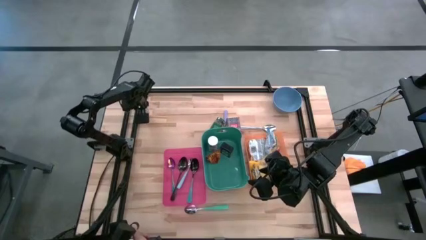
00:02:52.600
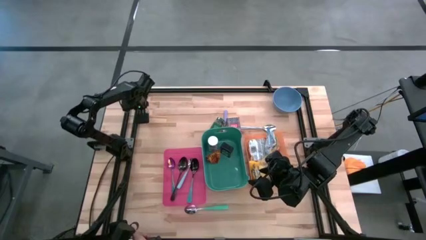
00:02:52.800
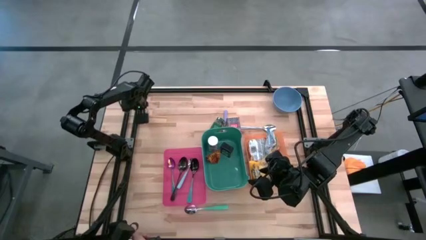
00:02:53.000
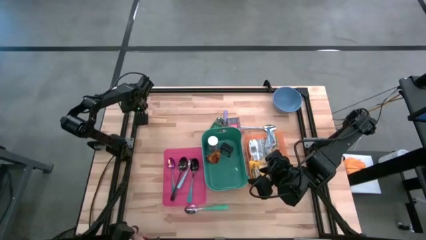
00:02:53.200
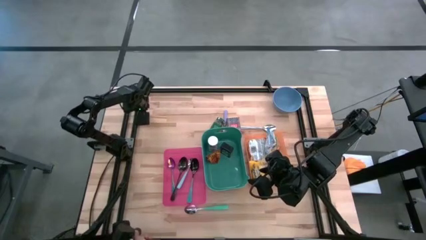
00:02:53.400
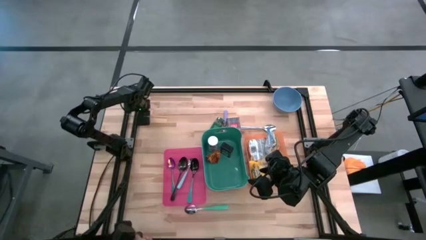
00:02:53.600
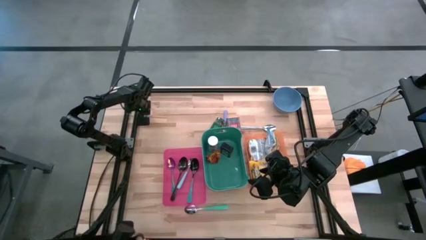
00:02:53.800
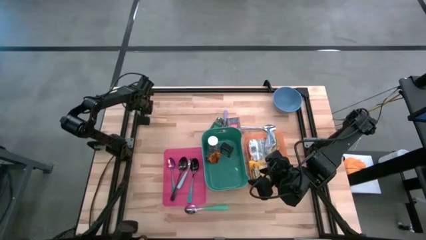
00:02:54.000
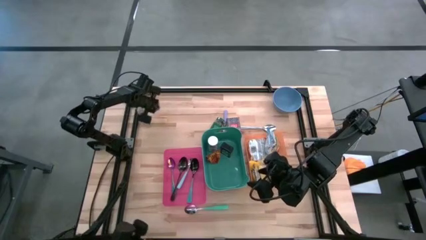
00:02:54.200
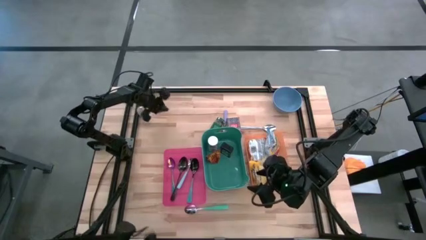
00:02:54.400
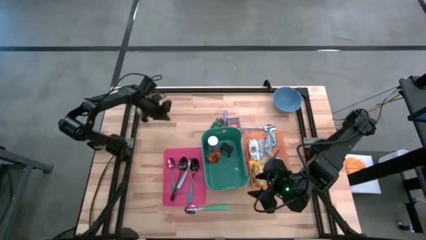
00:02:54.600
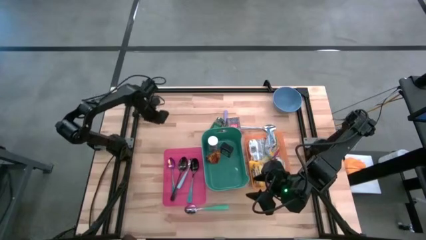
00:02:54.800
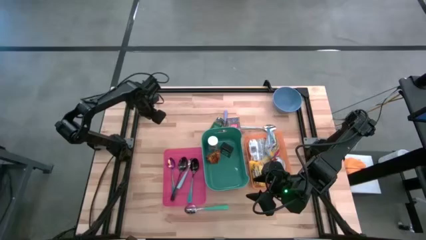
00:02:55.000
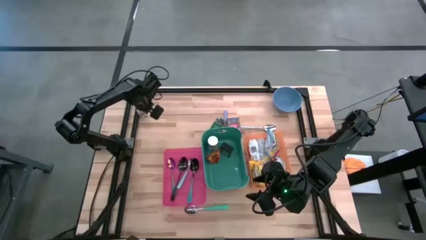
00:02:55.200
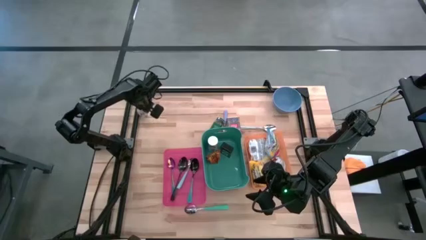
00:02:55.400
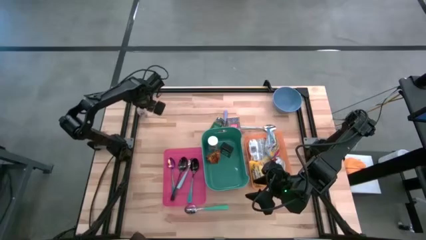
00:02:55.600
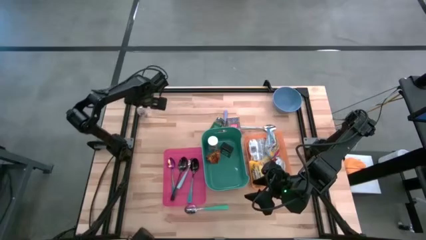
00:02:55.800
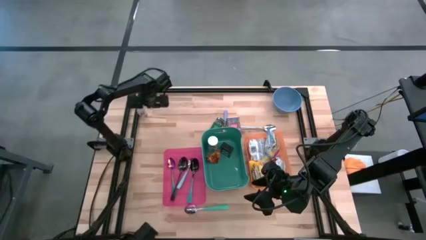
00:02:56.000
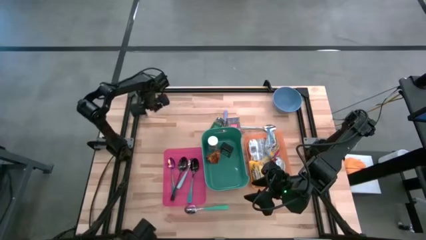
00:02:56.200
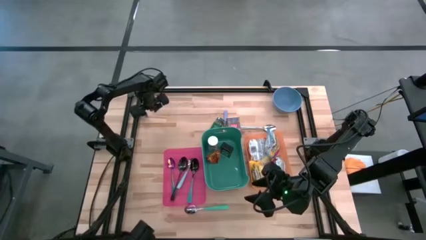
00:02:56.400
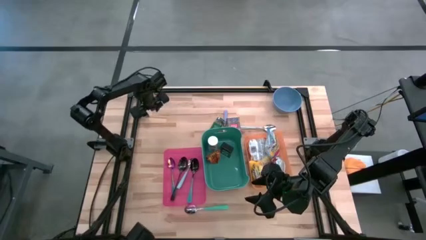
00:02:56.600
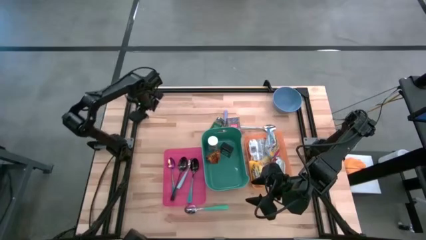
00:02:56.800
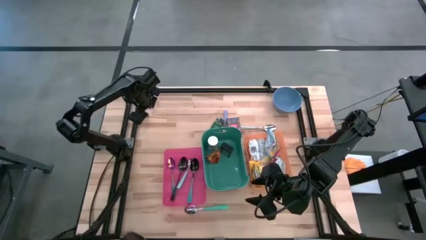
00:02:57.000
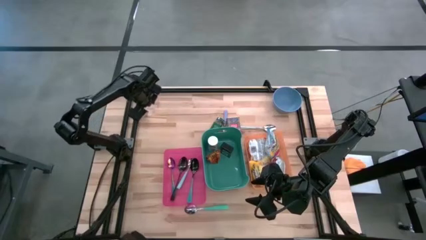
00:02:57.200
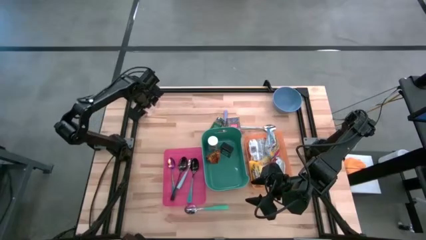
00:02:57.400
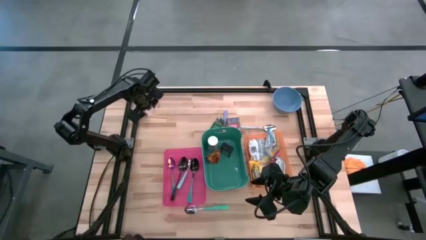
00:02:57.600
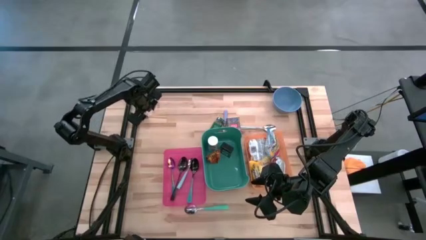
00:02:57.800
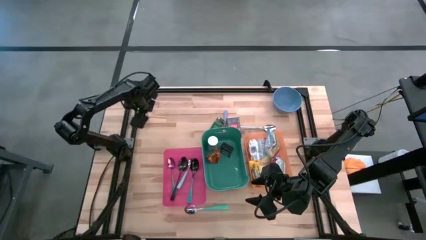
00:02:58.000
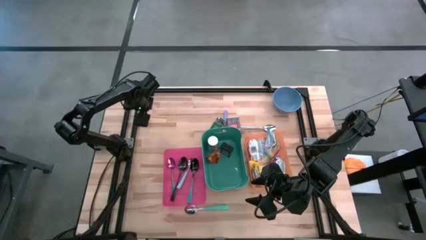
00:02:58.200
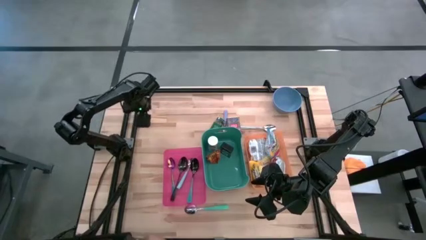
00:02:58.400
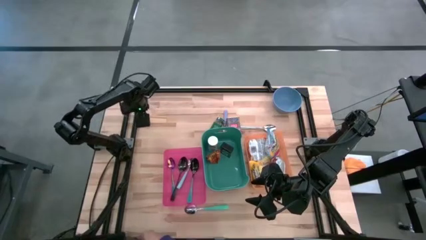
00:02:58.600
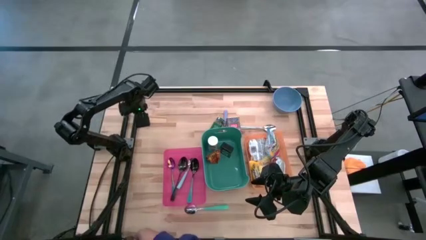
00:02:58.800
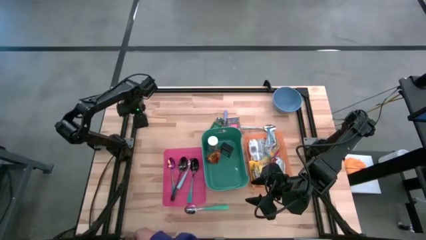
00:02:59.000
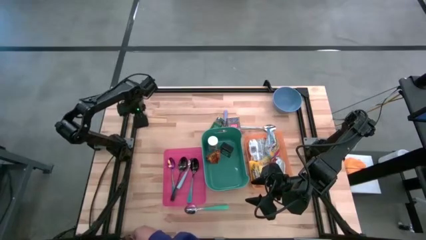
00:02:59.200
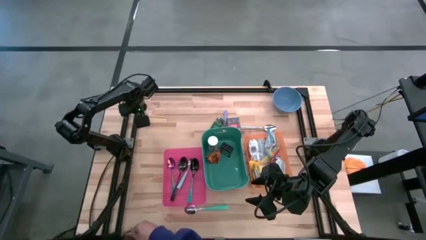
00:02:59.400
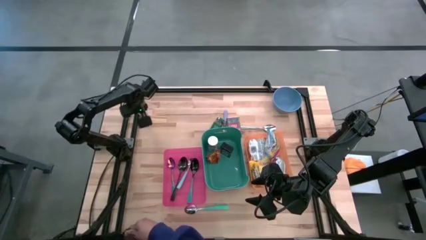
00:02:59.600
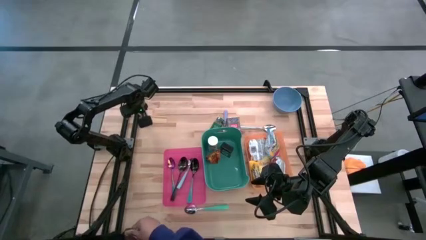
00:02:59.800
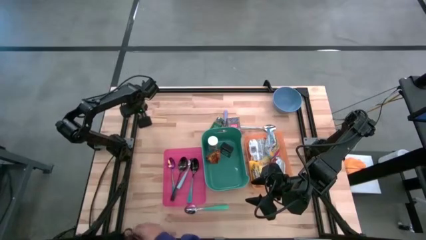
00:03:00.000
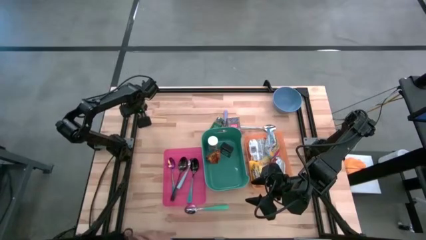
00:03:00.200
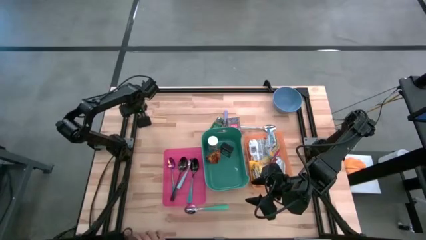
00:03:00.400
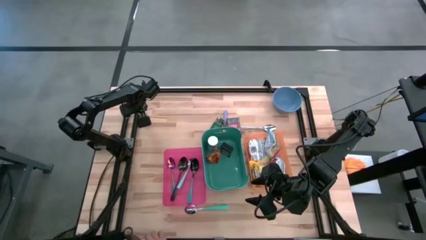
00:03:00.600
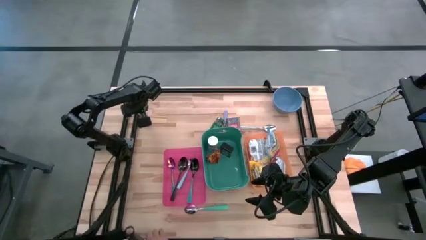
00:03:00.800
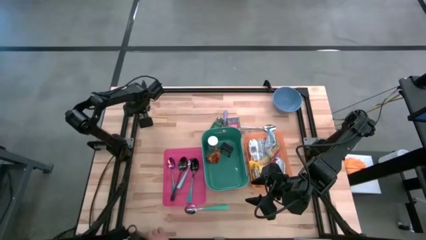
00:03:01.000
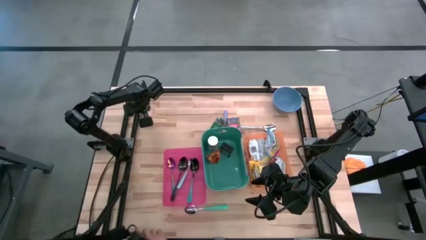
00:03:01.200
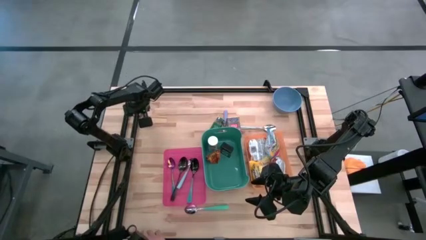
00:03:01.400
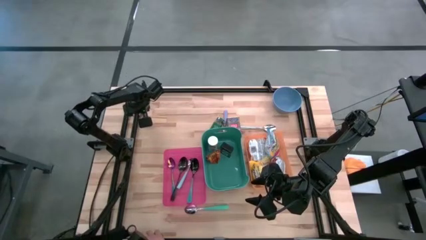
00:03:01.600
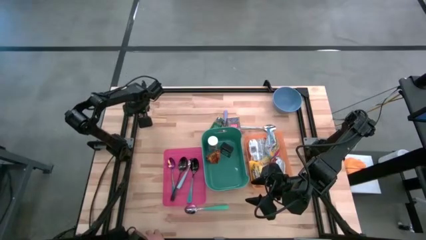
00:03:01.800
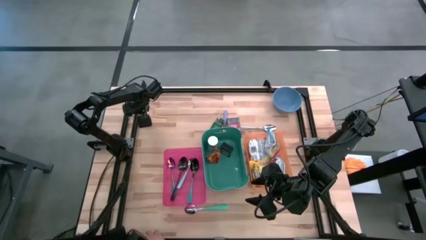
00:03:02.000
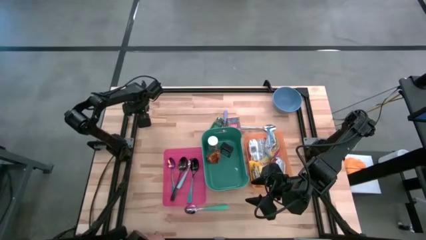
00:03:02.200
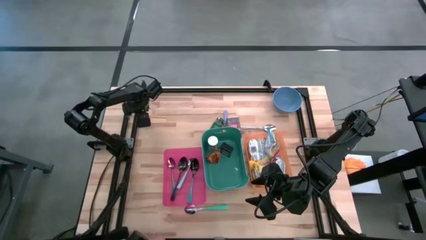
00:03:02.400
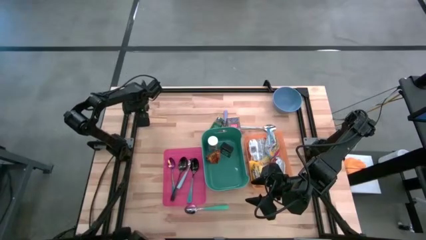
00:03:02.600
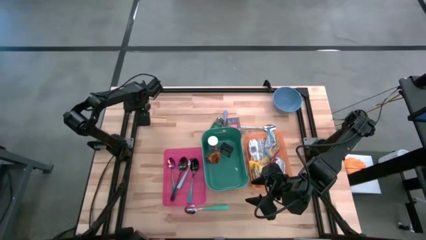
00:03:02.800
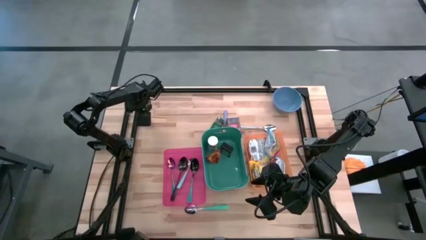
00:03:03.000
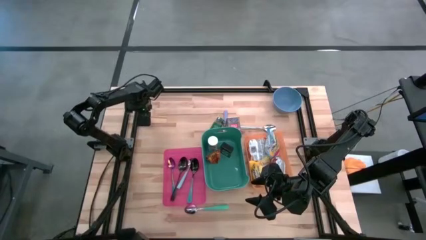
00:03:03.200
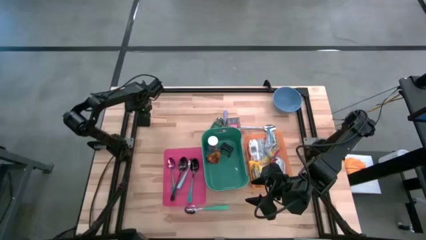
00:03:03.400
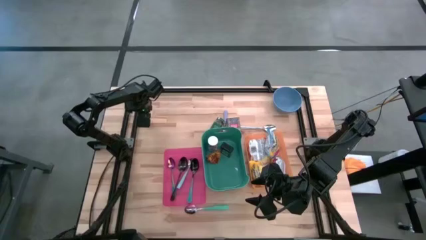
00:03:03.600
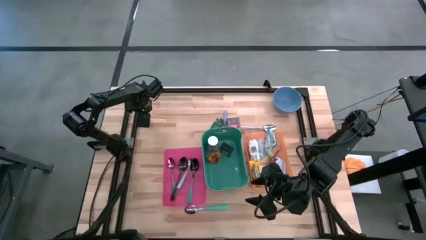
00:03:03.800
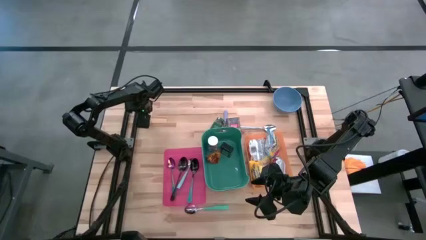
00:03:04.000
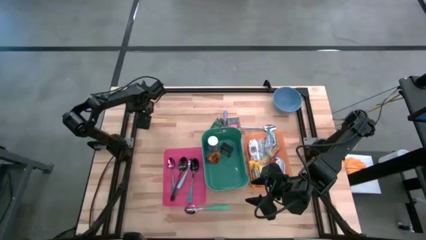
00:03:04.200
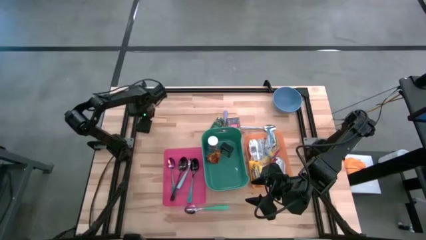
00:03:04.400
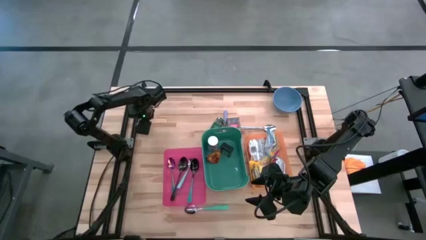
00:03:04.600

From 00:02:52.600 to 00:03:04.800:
Put the brown seasoning bottle into the green bin
